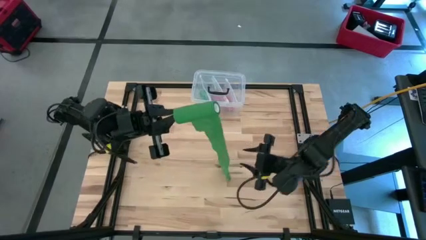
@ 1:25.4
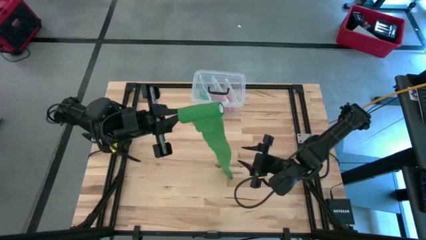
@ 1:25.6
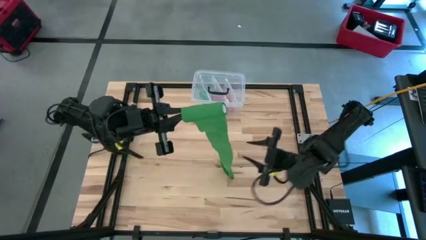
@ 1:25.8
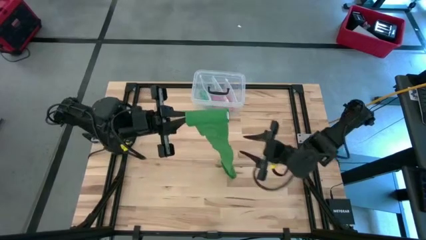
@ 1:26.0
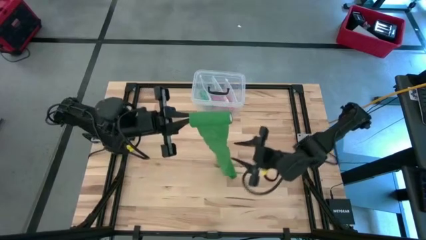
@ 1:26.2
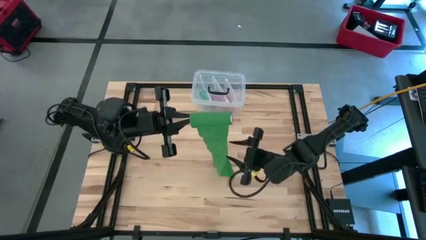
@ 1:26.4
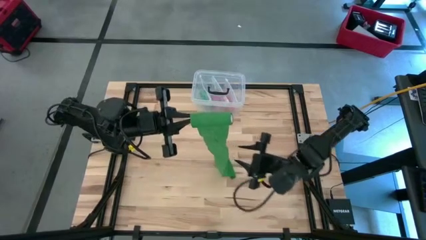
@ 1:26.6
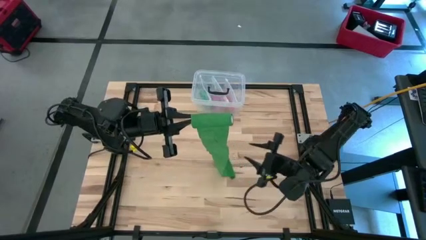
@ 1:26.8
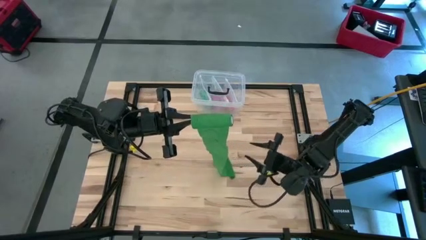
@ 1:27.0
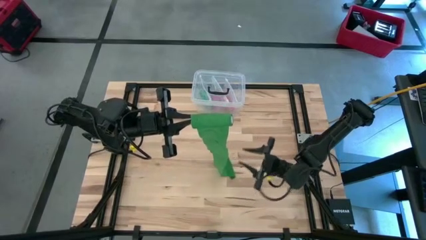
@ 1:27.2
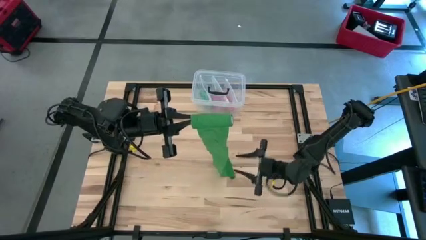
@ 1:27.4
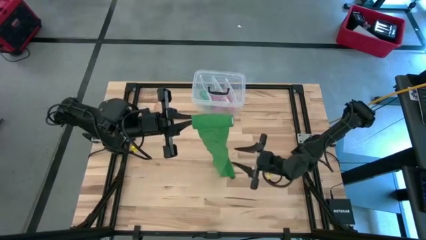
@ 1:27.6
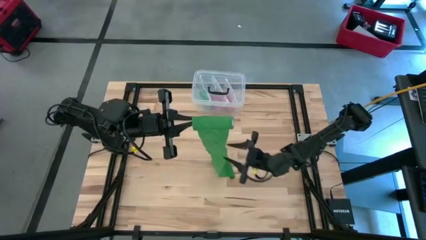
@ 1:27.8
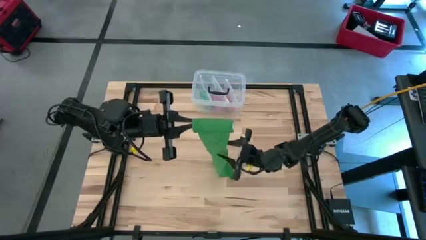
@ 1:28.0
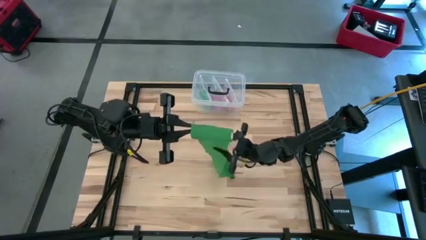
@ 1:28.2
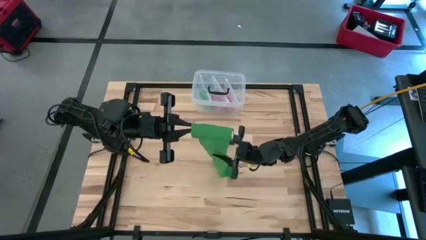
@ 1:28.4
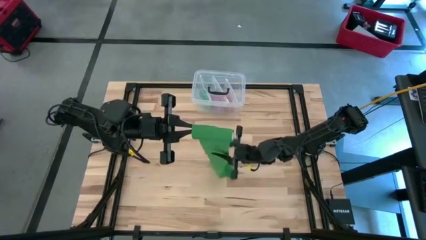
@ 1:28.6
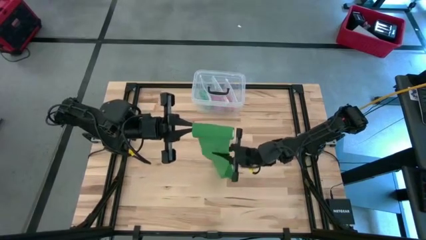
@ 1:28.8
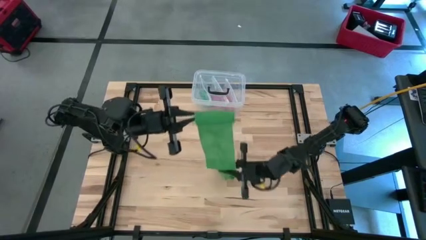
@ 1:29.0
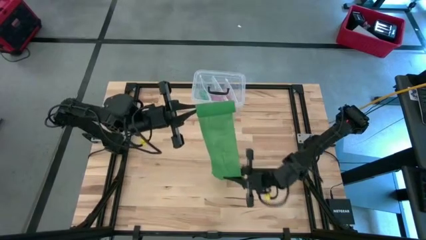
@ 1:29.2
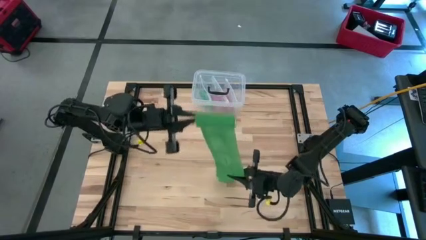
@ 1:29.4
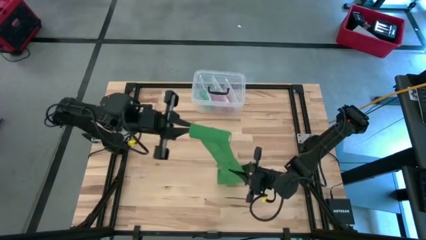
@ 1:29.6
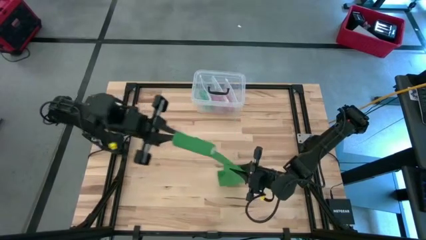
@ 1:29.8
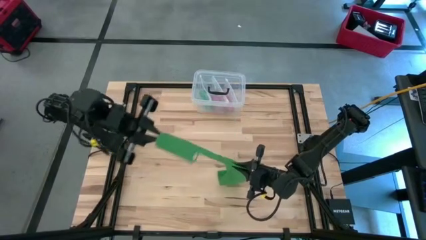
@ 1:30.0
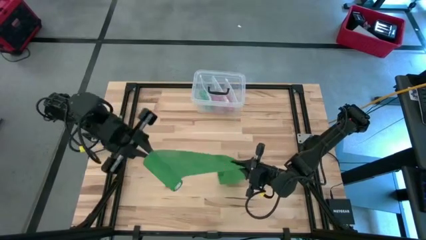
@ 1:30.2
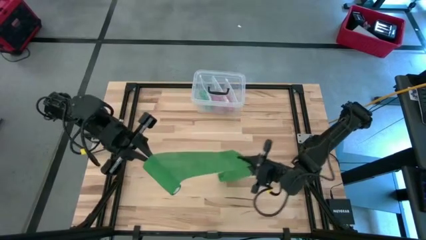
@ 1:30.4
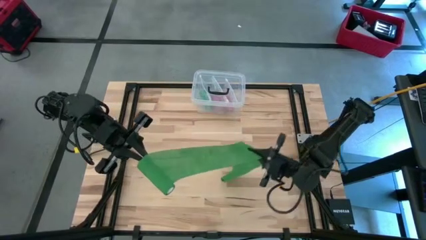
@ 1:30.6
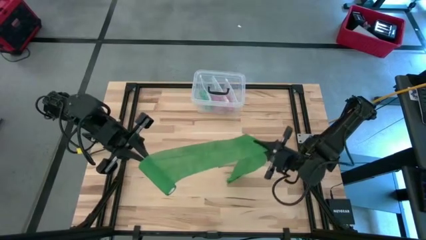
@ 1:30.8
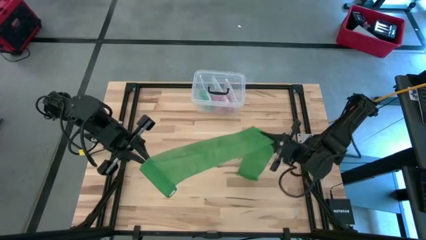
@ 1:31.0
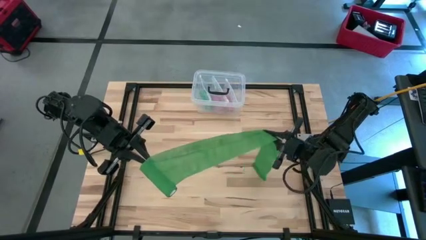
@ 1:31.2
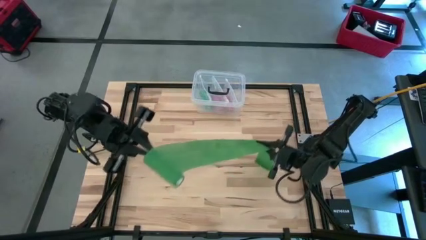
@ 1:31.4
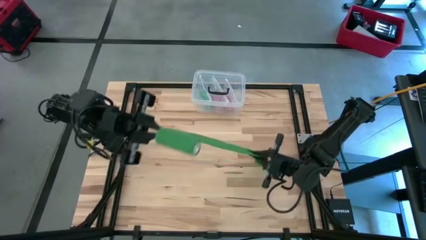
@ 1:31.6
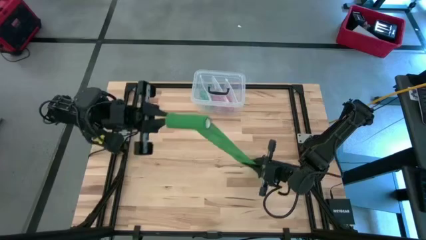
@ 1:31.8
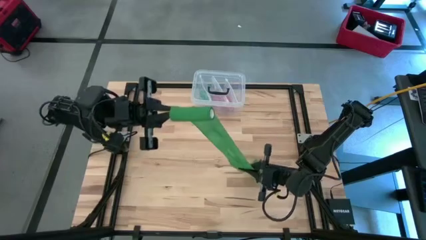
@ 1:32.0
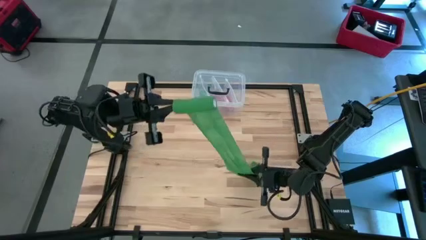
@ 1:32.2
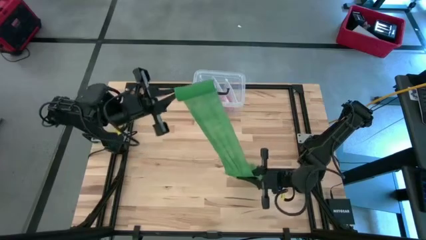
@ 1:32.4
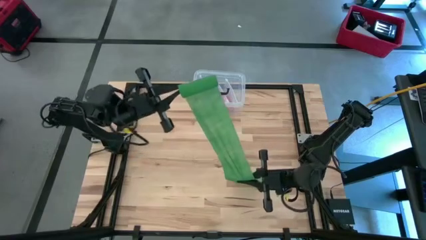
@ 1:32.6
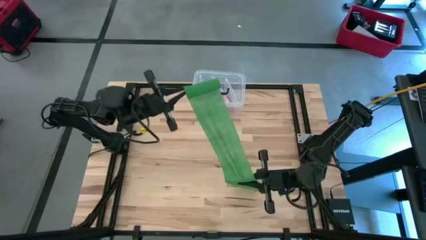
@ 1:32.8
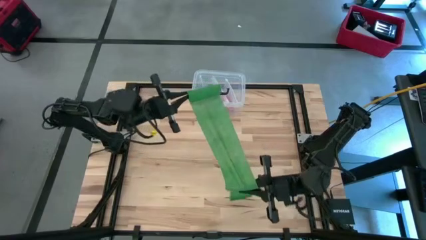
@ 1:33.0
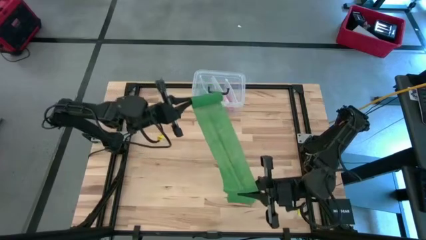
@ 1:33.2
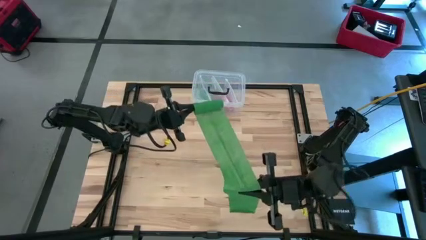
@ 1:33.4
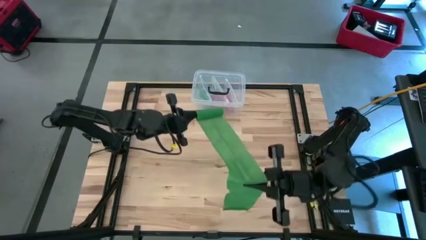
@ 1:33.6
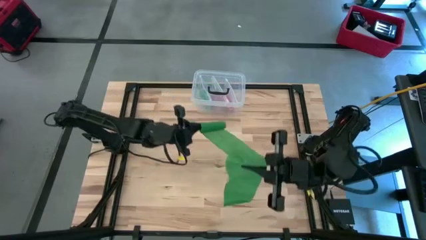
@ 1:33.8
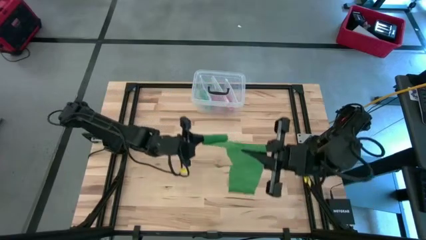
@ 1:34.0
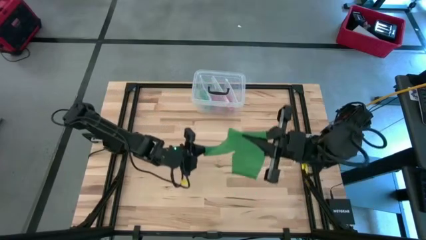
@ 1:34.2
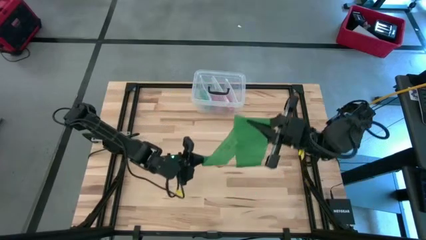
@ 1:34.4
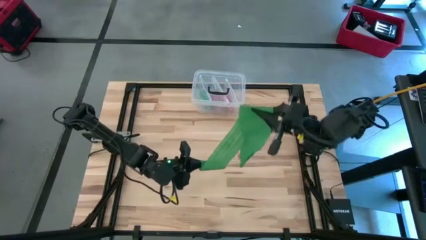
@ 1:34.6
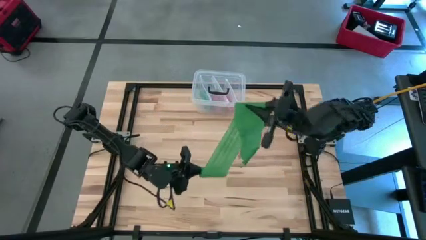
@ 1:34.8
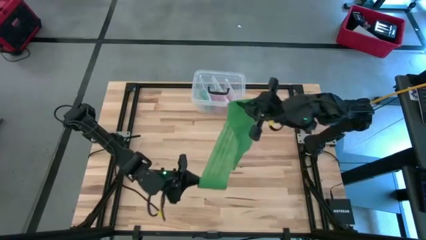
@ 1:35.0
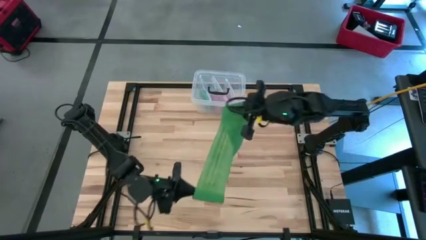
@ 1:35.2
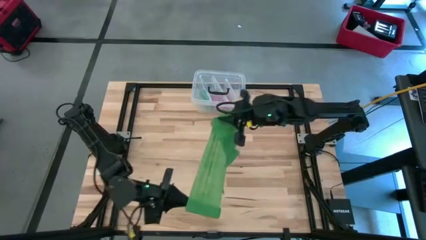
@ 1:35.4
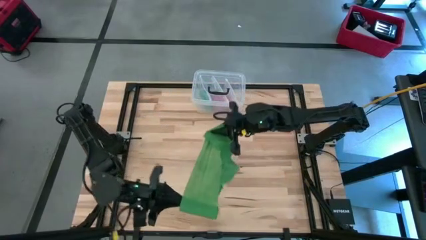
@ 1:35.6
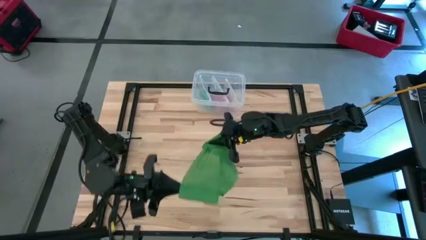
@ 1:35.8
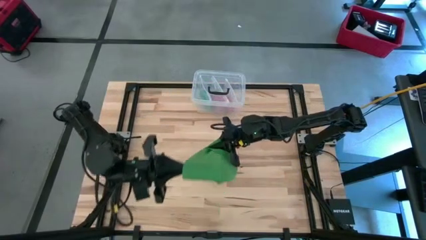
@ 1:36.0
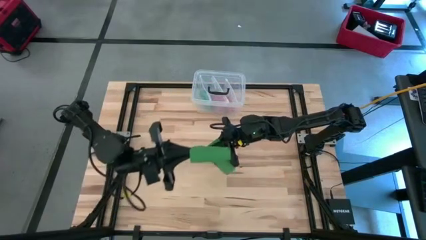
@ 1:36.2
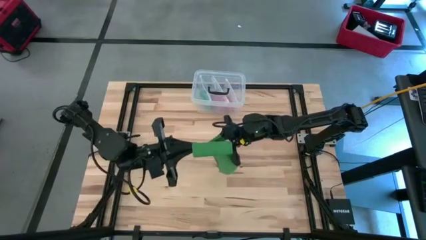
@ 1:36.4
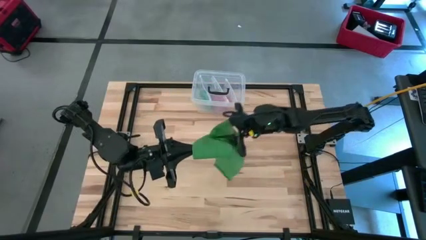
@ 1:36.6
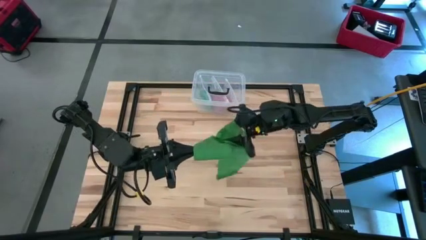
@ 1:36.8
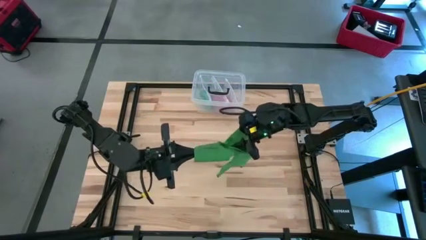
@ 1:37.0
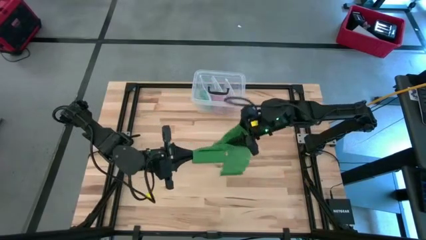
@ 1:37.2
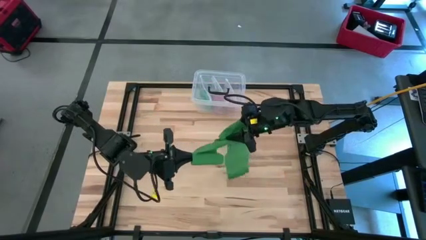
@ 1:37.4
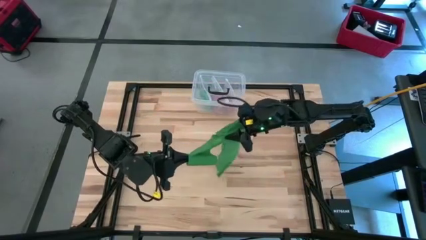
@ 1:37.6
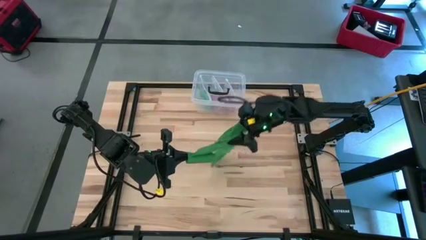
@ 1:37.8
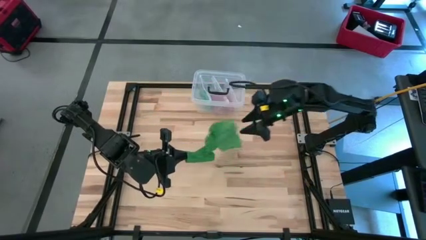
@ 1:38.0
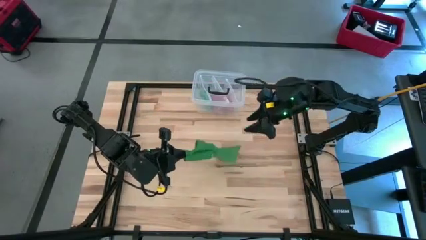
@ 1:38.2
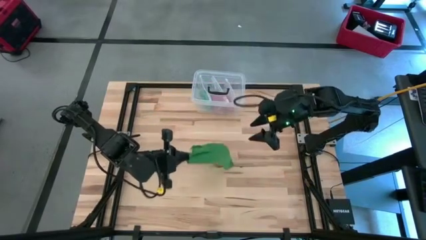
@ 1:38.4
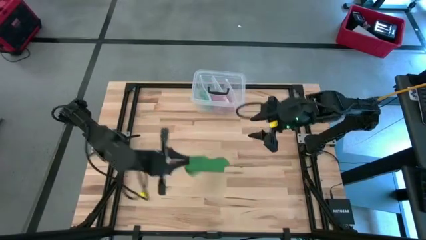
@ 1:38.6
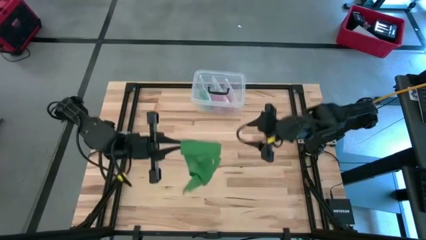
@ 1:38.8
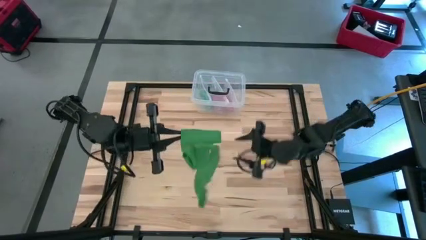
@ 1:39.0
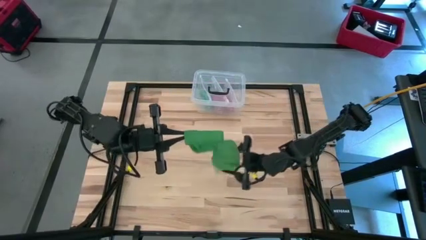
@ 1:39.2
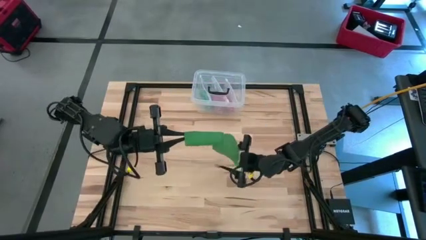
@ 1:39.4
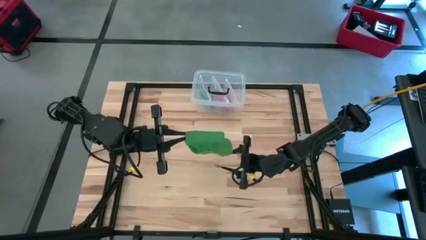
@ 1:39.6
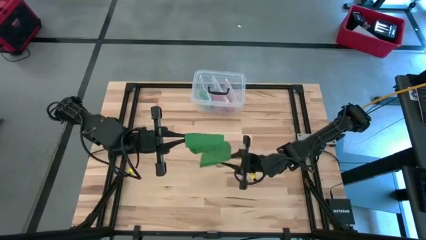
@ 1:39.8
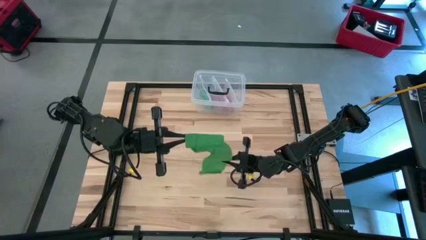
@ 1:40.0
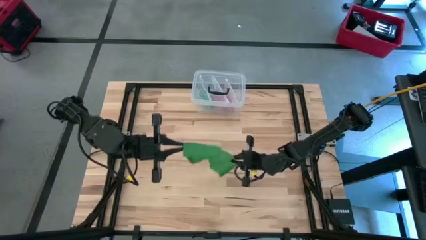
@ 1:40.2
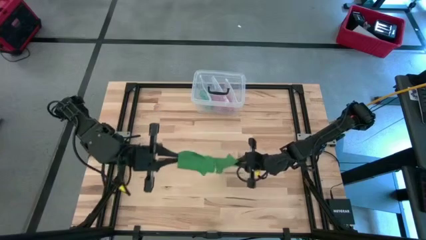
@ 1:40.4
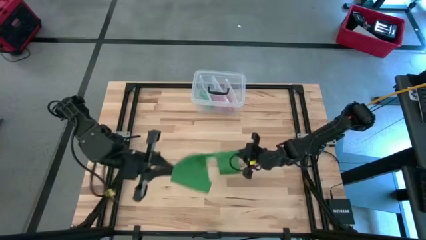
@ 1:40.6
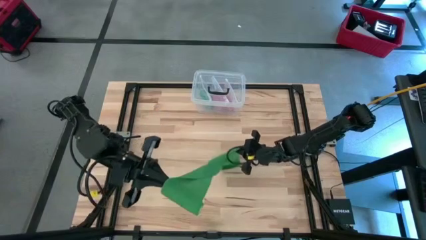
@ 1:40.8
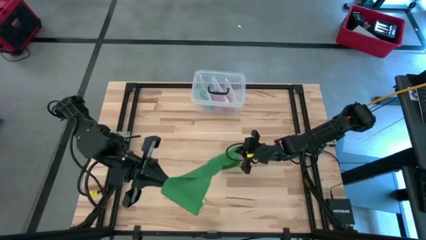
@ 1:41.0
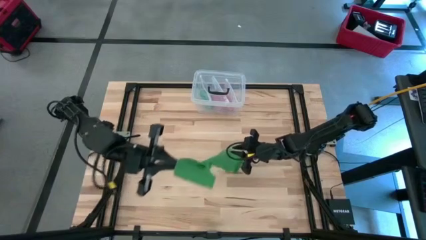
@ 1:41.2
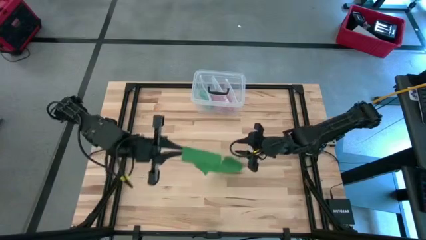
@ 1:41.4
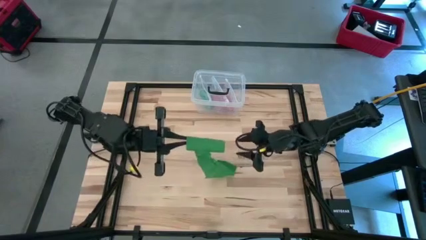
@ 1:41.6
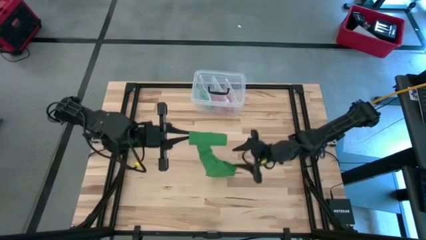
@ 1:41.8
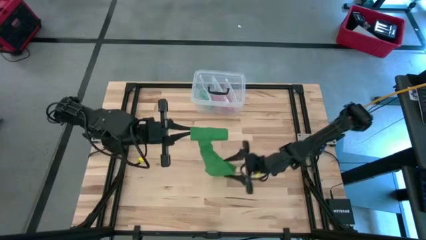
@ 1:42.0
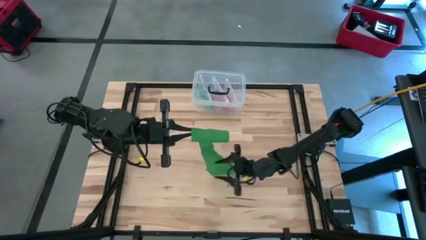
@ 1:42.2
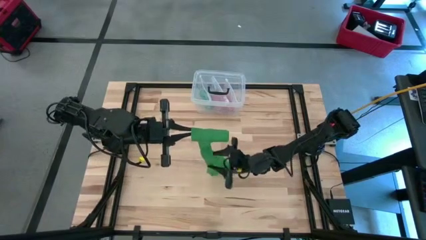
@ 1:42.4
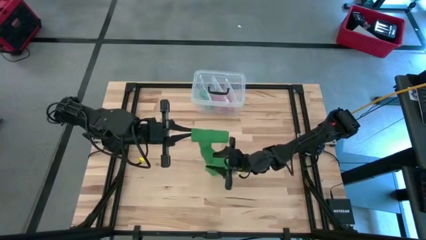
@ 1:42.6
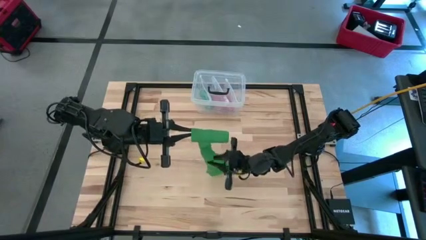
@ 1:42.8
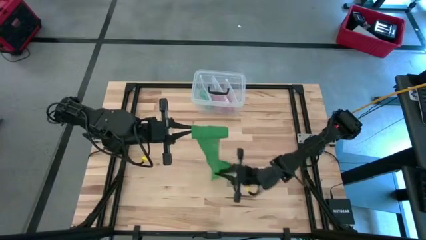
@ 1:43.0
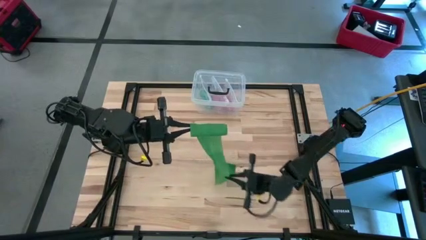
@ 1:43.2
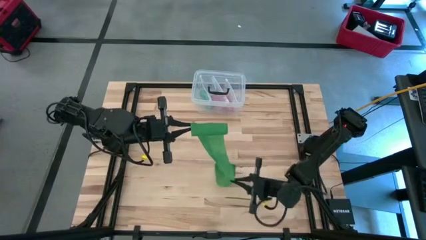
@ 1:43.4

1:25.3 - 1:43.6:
Task: Roll bandage
Roll the green bandage
